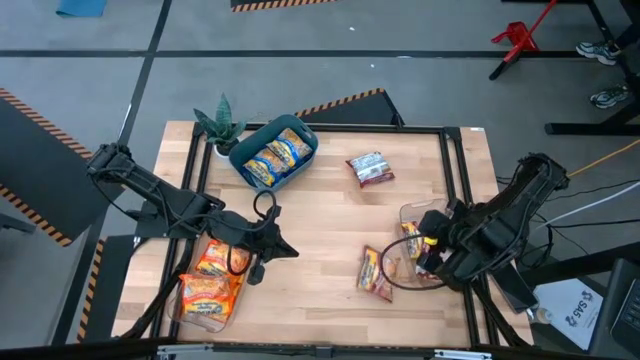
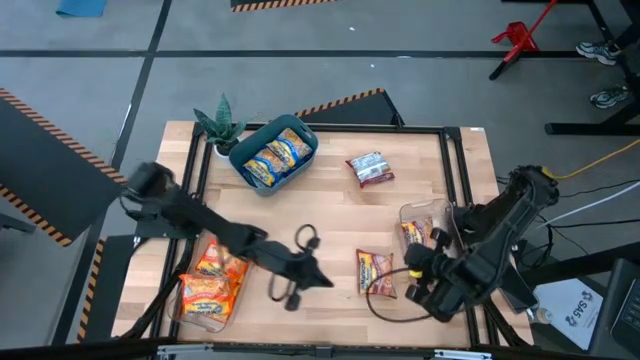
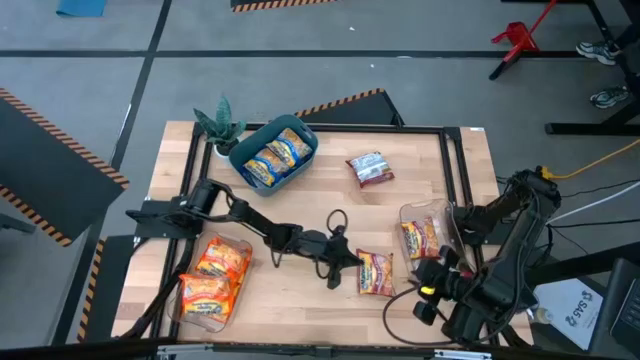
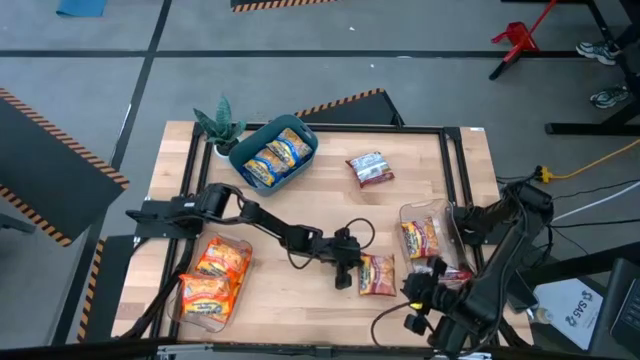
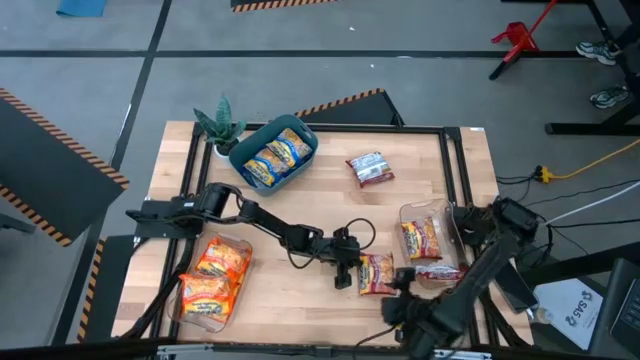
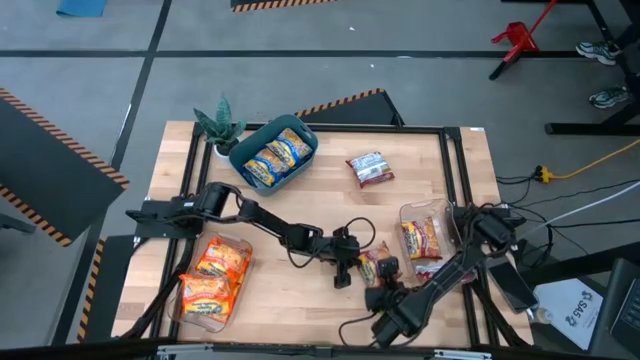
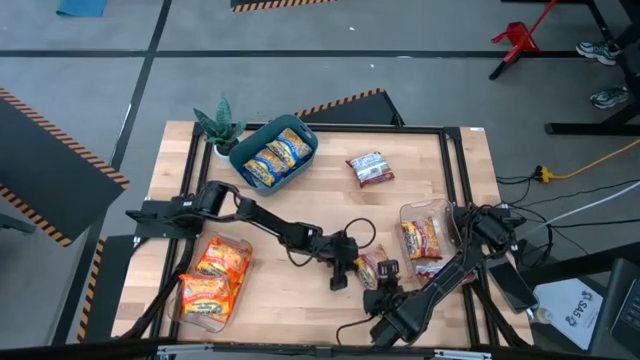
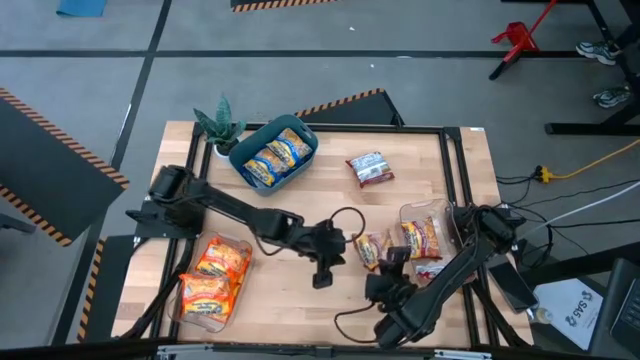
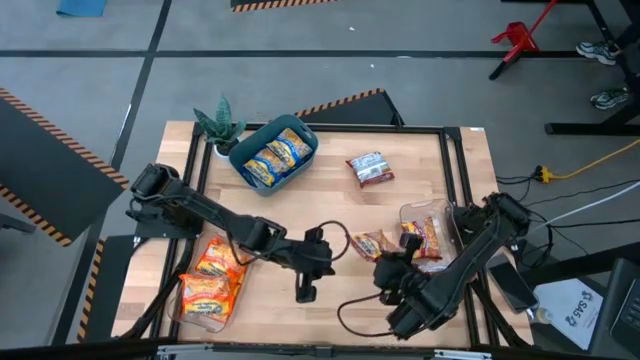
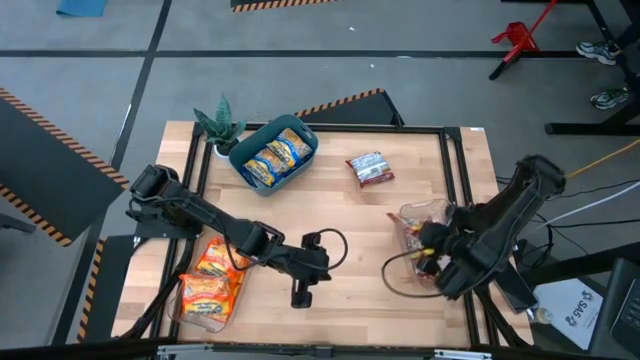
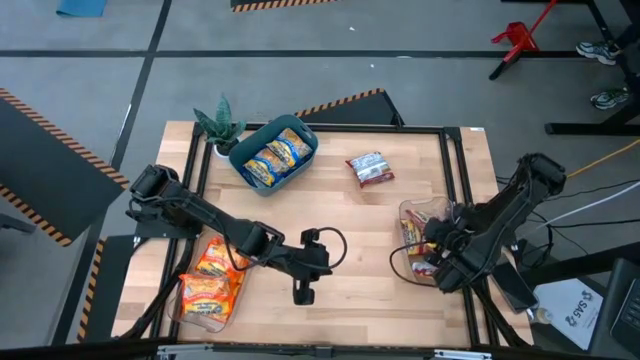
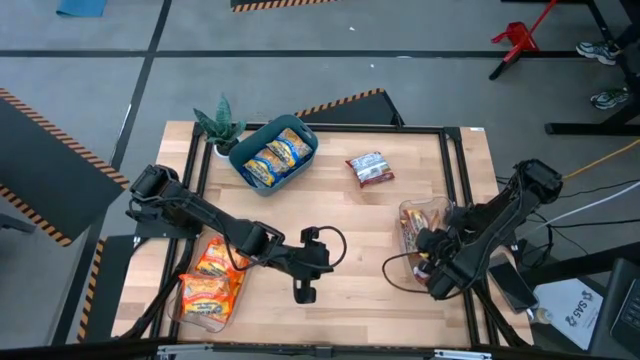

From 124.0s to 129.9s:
Task: Sort Maruchan noodles
Put the red noodle pack into the right transparent bin

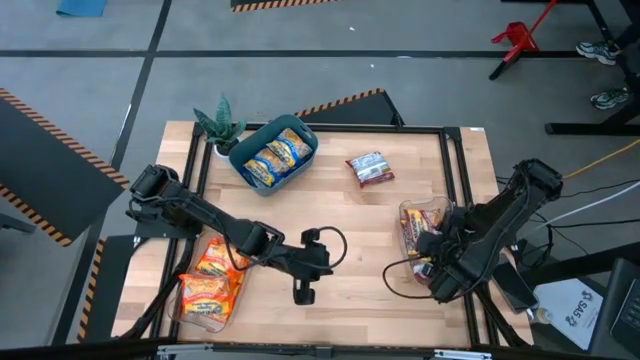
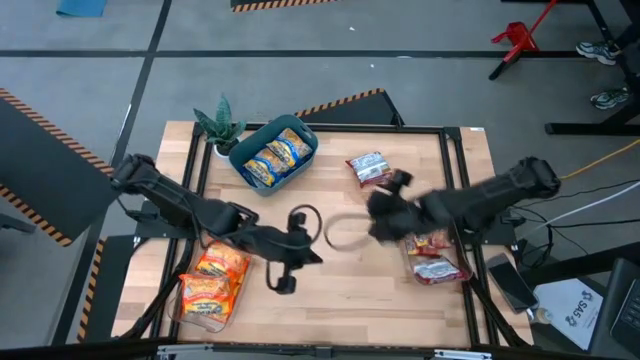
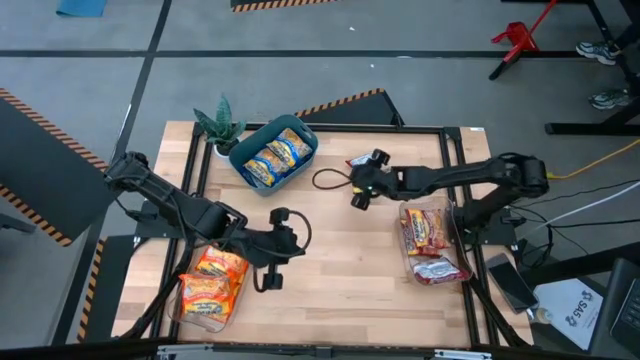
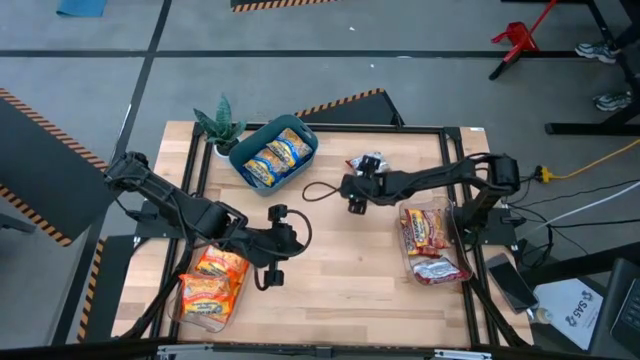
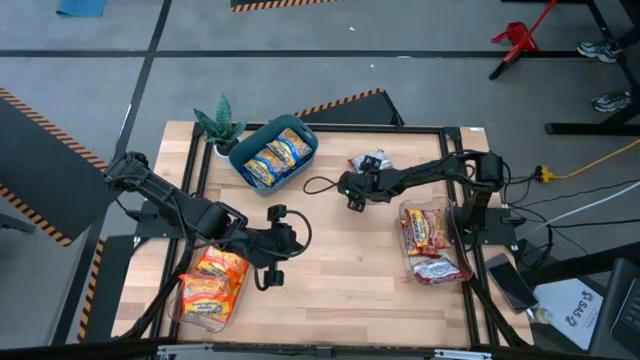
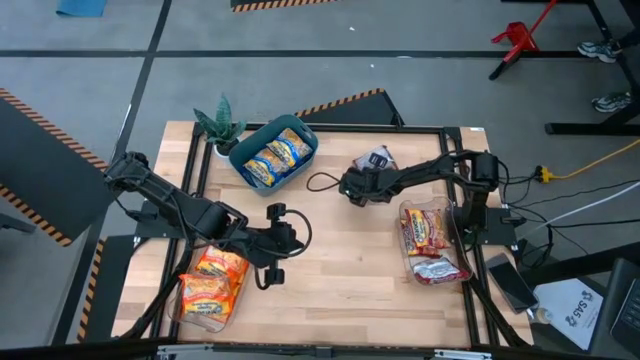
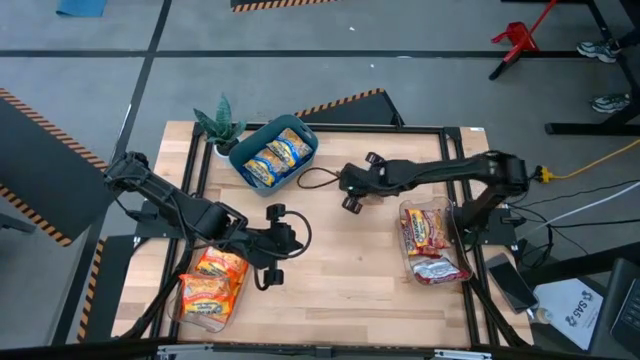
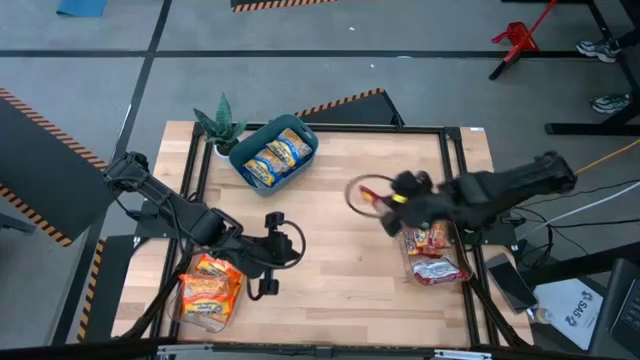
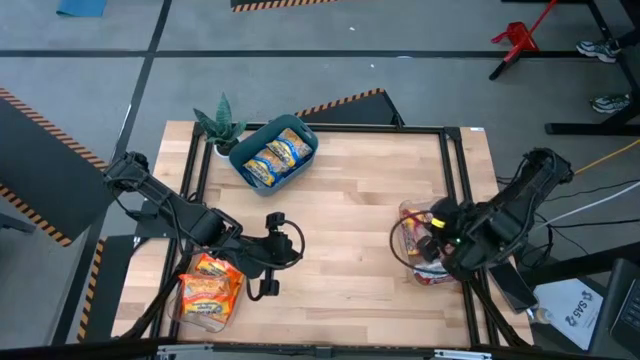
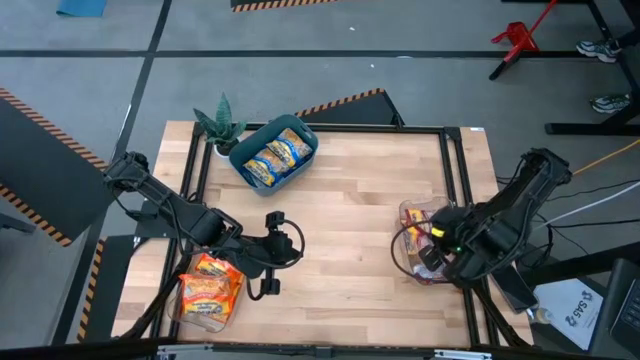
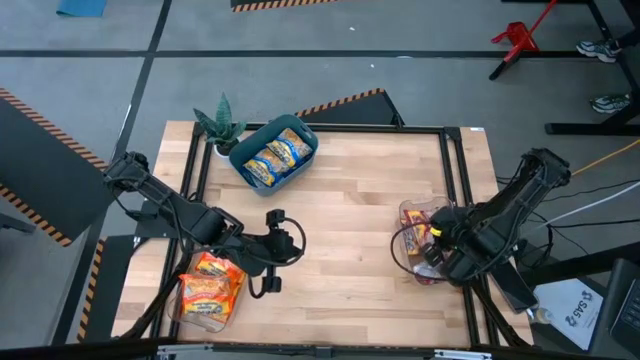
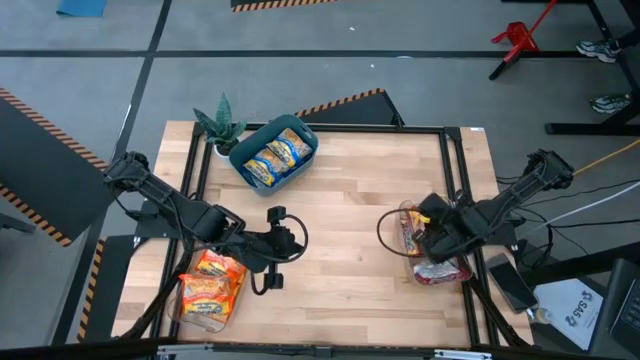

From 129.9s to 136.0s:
Put the red noodle pack into the red transparent bin

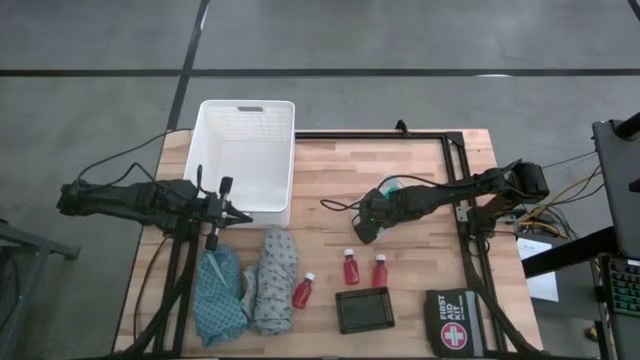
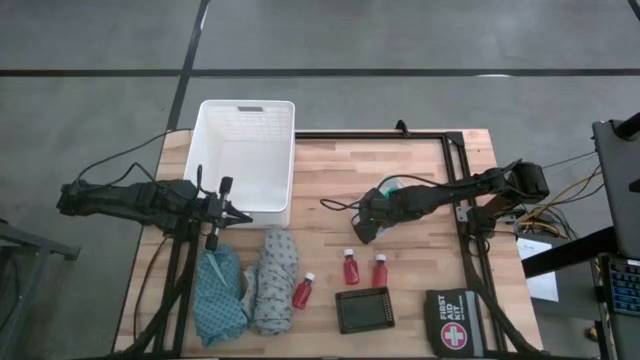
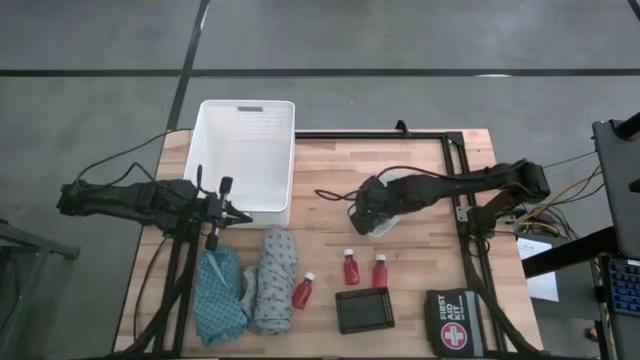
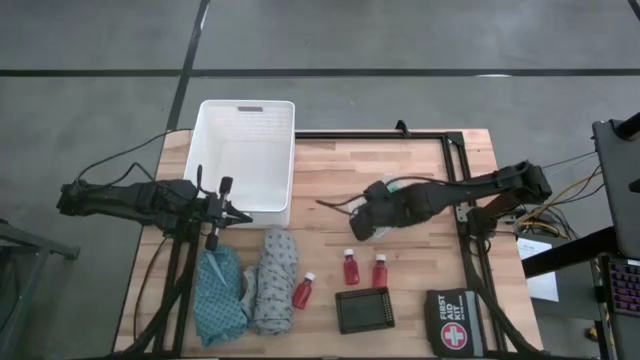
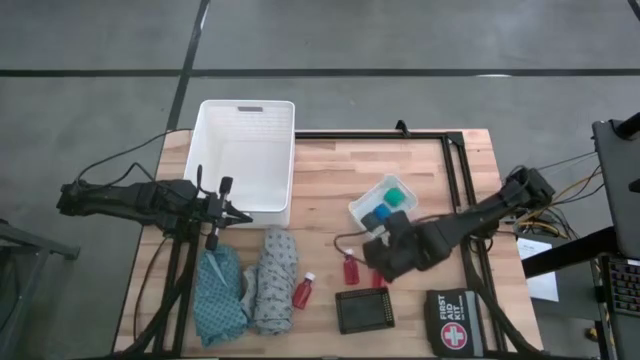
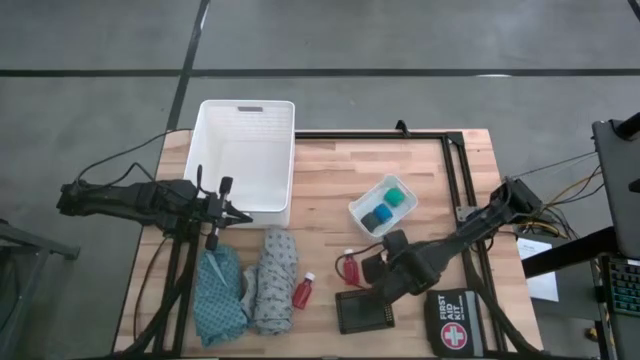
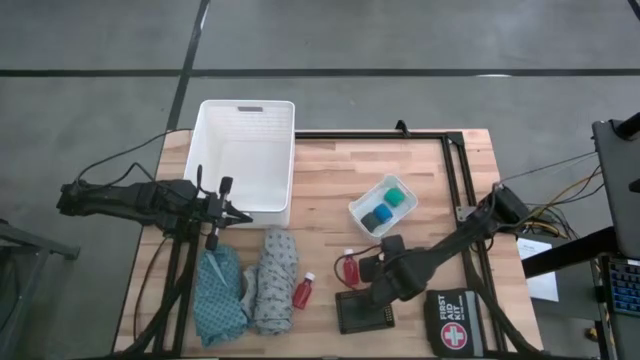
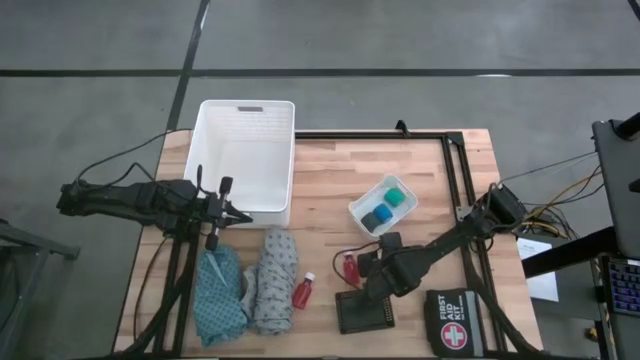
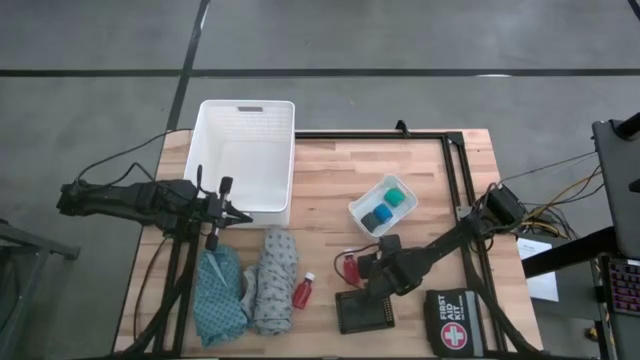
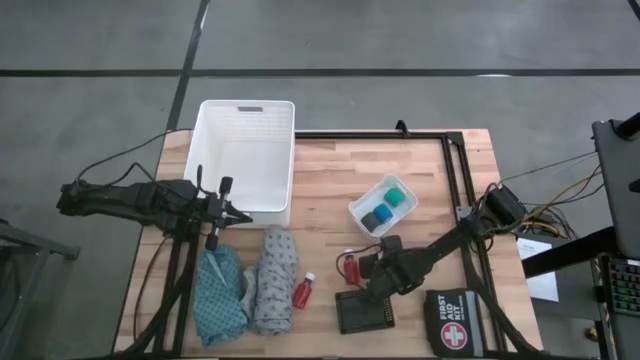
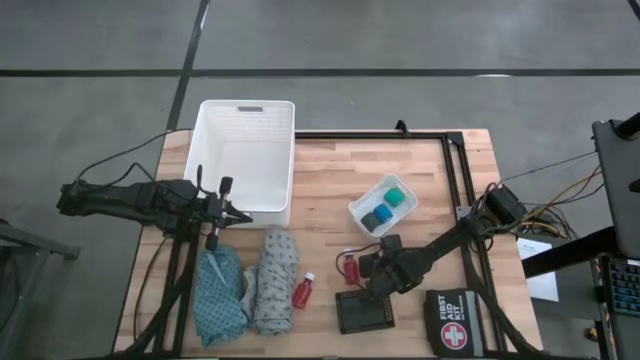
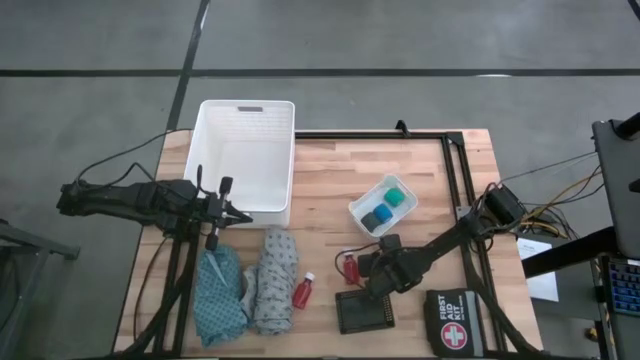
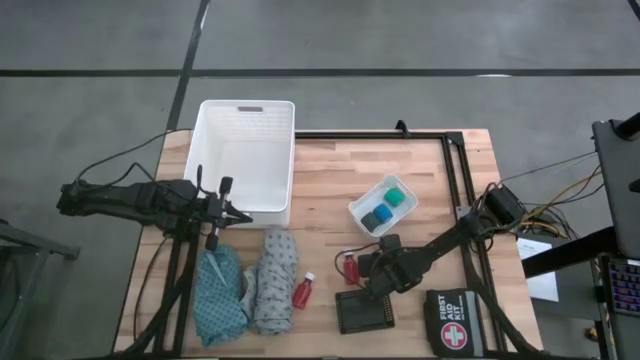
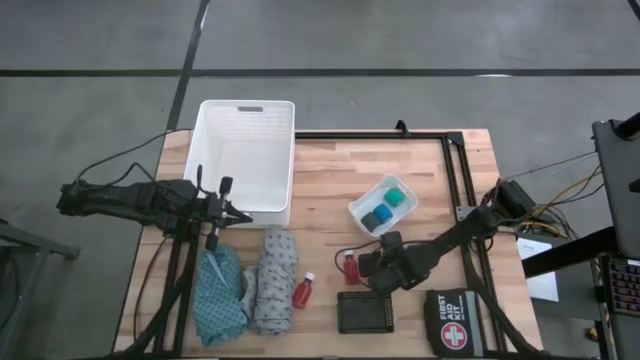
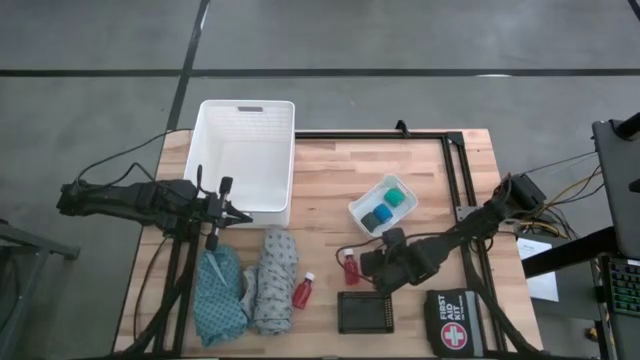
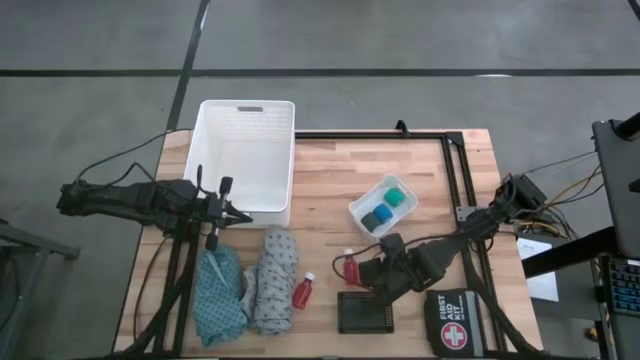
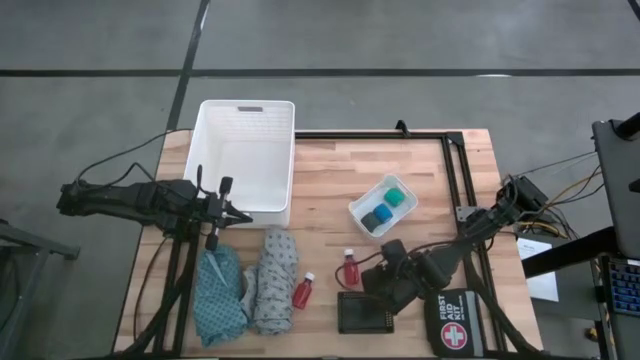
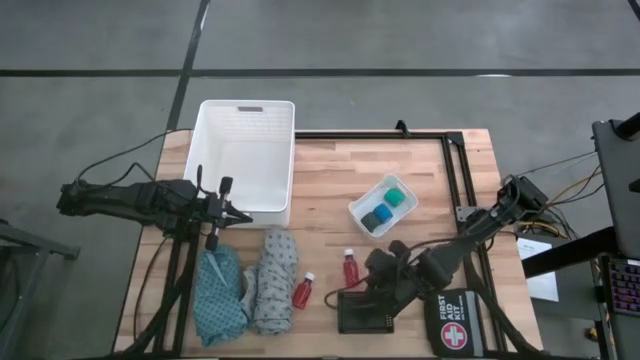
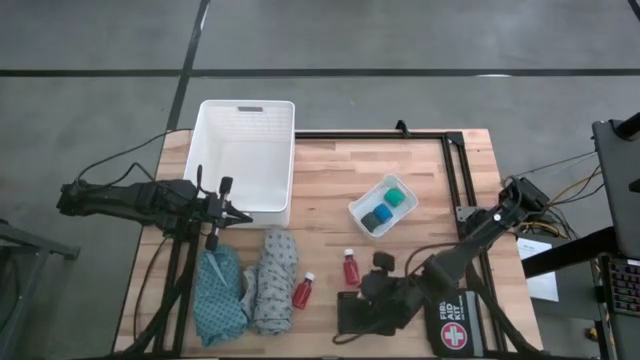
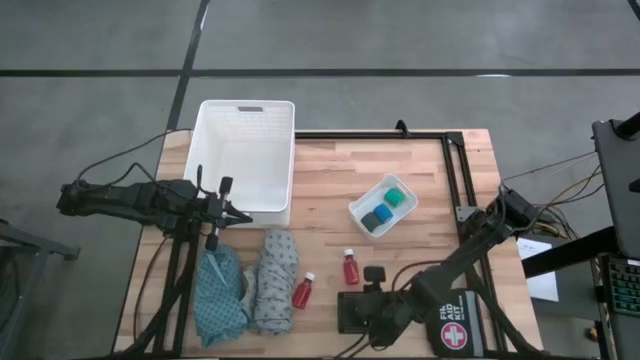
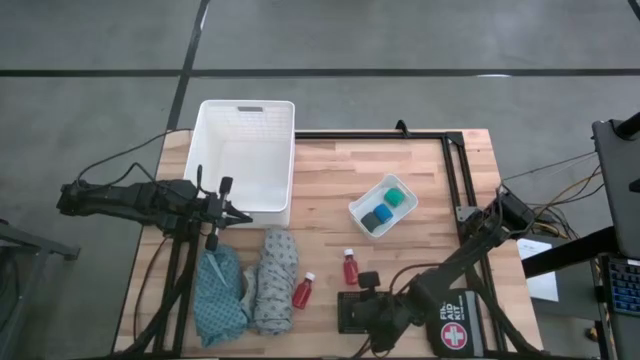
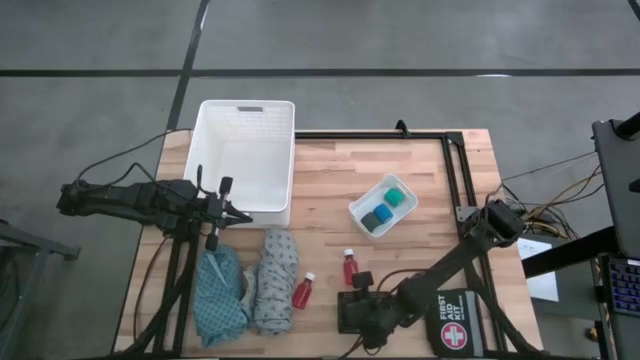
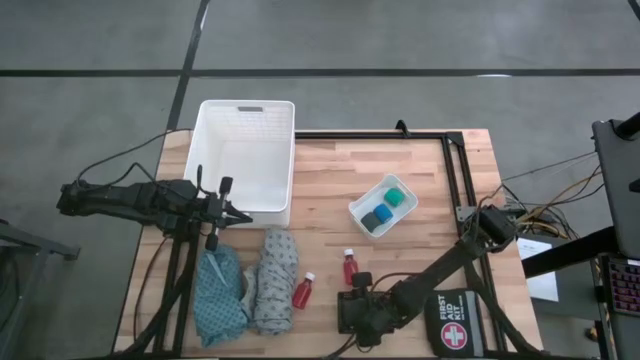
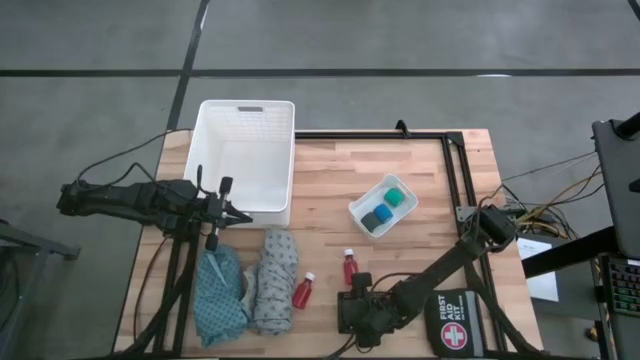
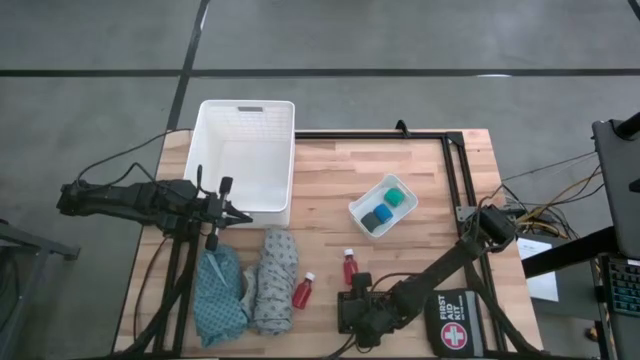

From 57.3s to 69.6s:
Task: Pick & place medical supplies in basket/bin
Put the right red pill bottle into the black bin
